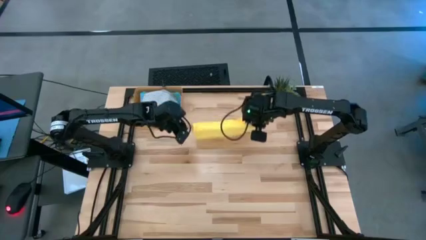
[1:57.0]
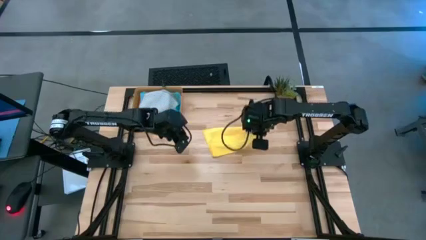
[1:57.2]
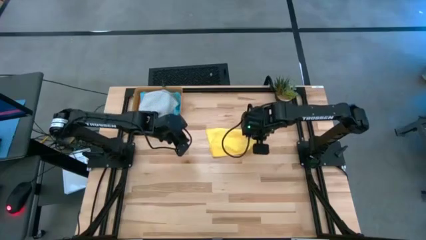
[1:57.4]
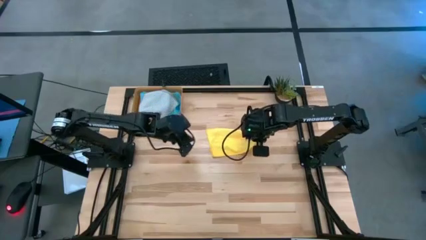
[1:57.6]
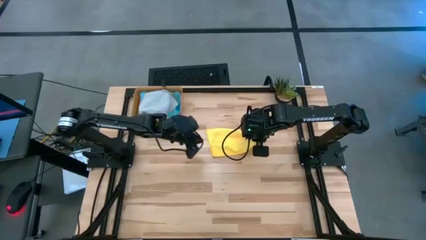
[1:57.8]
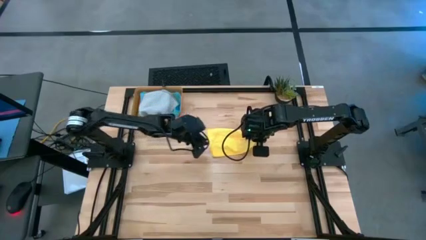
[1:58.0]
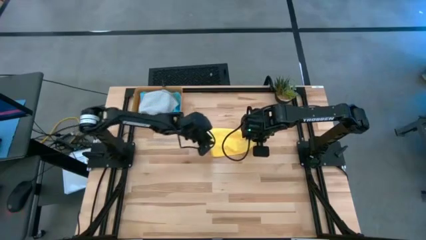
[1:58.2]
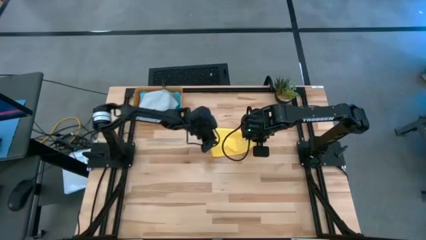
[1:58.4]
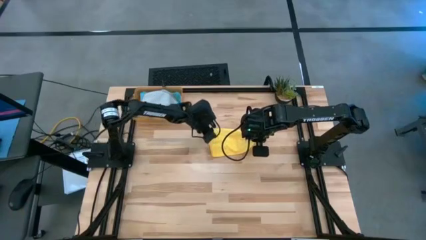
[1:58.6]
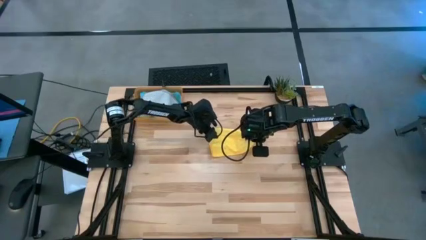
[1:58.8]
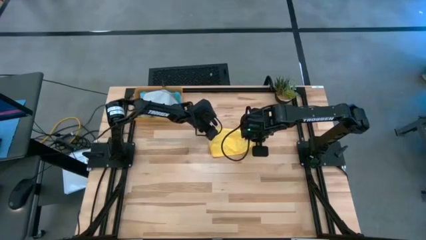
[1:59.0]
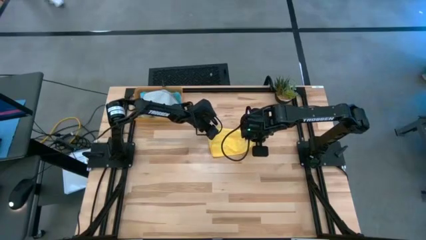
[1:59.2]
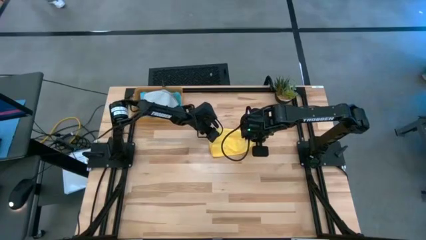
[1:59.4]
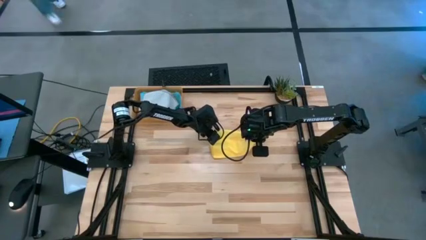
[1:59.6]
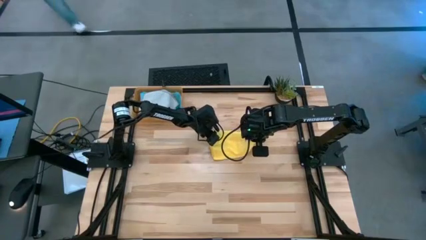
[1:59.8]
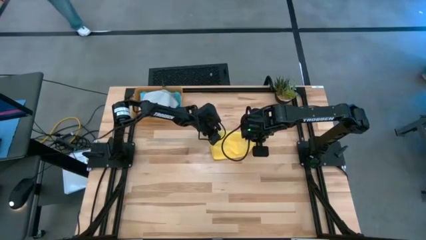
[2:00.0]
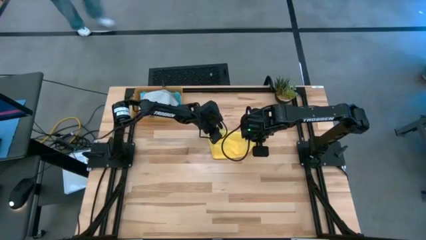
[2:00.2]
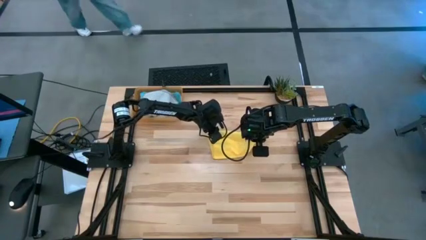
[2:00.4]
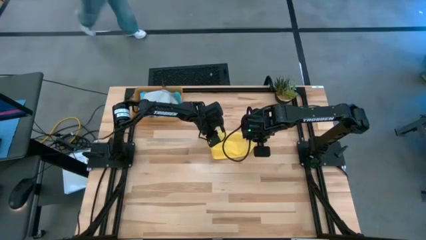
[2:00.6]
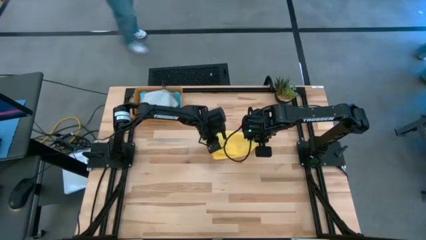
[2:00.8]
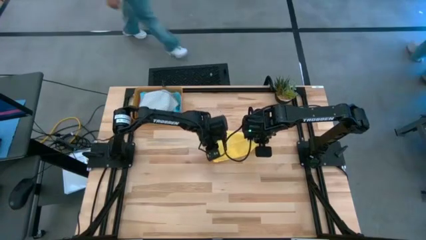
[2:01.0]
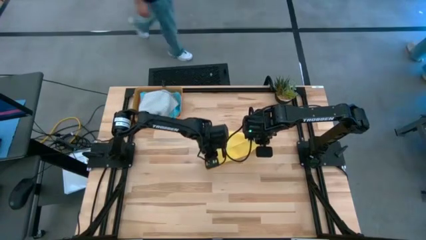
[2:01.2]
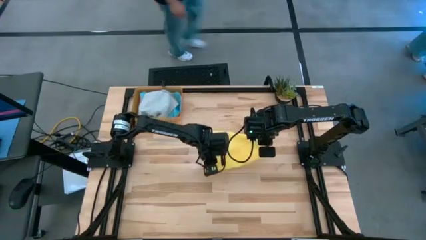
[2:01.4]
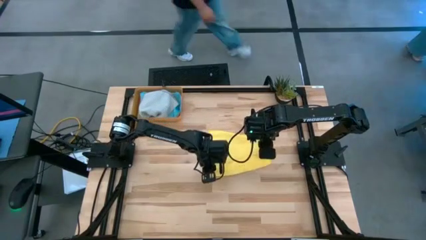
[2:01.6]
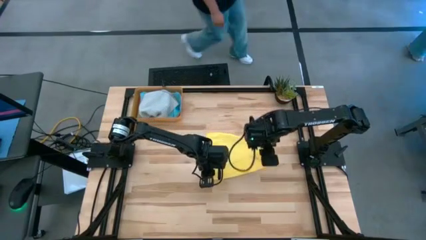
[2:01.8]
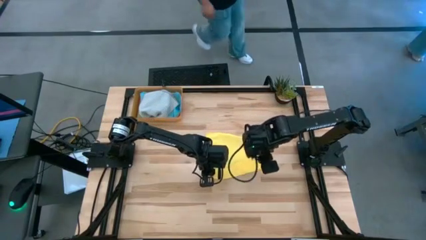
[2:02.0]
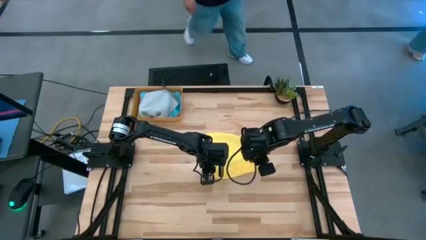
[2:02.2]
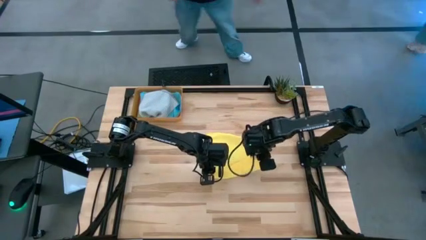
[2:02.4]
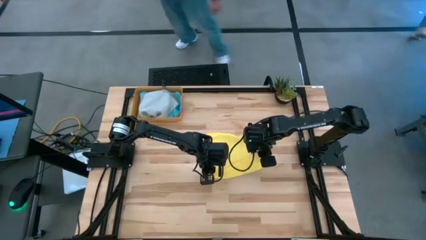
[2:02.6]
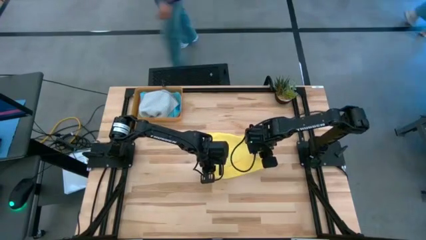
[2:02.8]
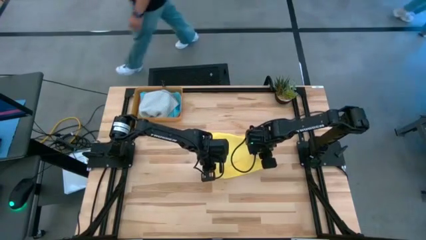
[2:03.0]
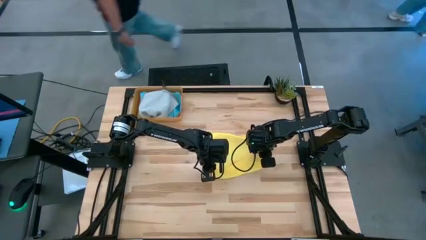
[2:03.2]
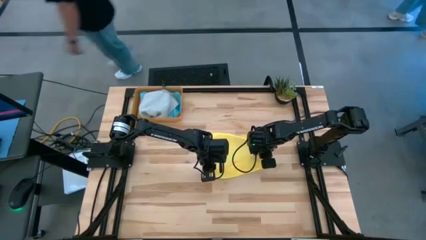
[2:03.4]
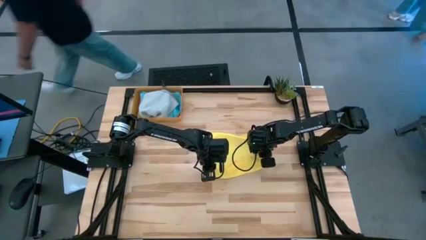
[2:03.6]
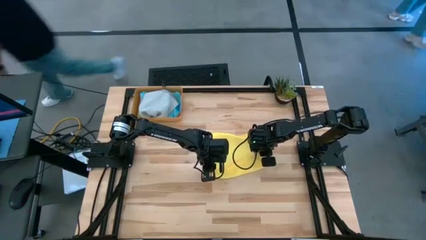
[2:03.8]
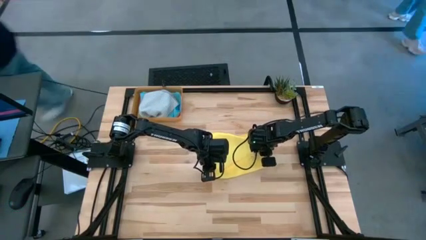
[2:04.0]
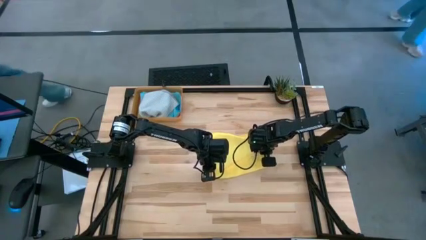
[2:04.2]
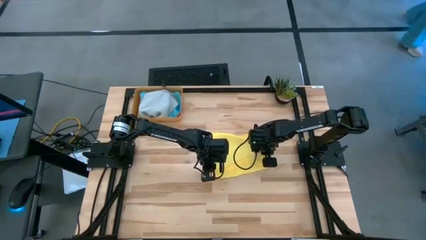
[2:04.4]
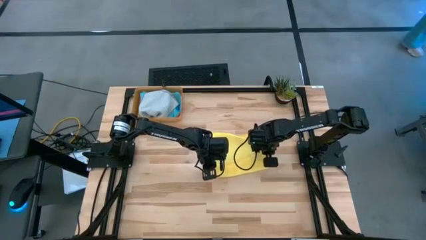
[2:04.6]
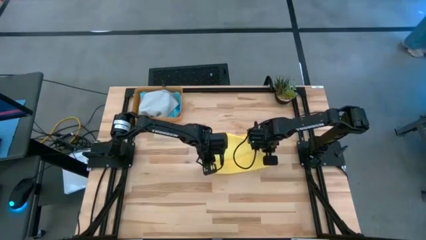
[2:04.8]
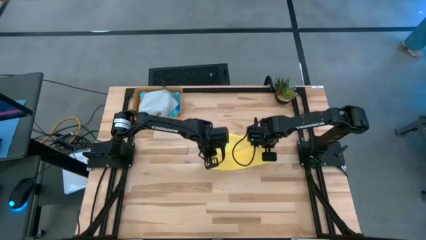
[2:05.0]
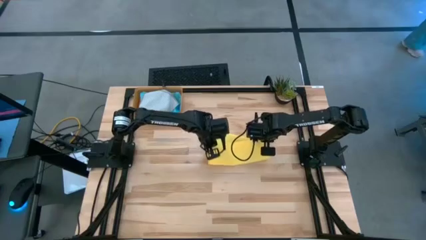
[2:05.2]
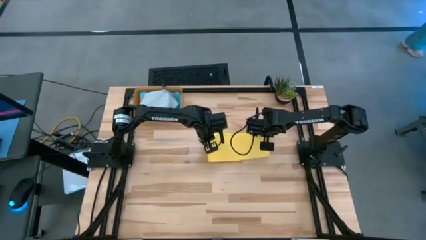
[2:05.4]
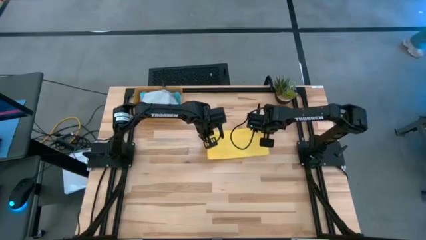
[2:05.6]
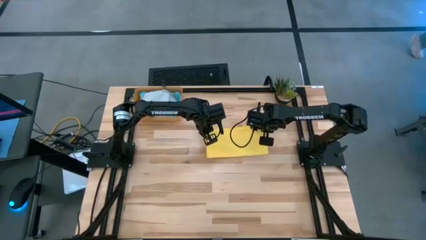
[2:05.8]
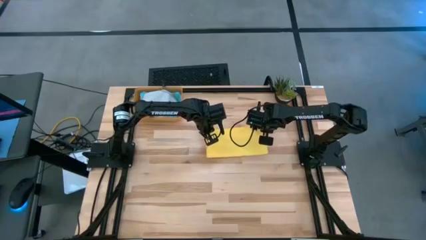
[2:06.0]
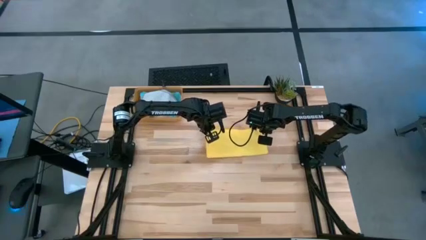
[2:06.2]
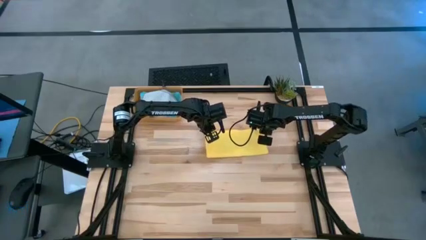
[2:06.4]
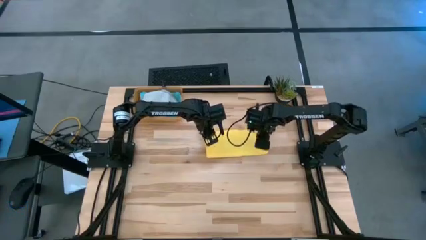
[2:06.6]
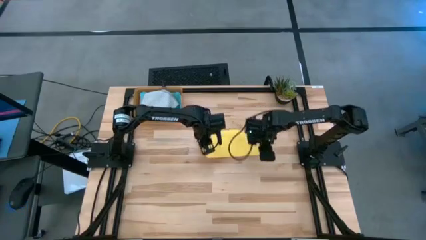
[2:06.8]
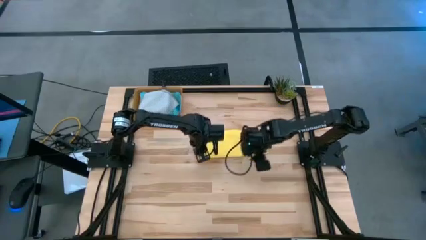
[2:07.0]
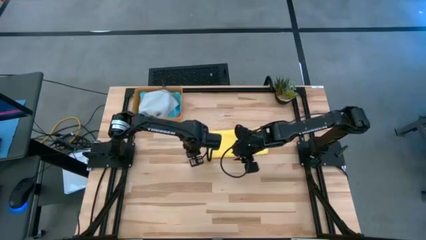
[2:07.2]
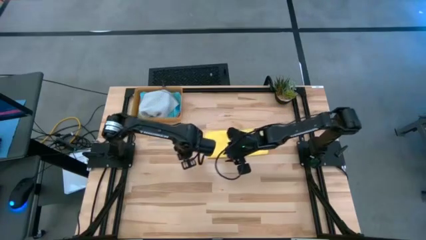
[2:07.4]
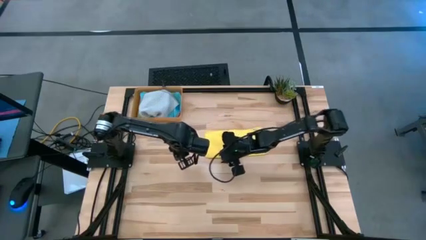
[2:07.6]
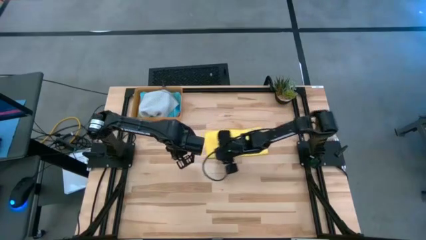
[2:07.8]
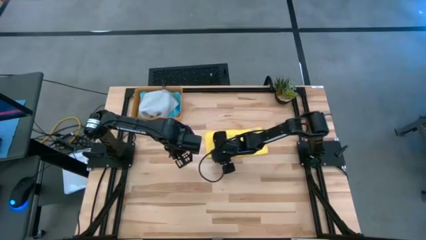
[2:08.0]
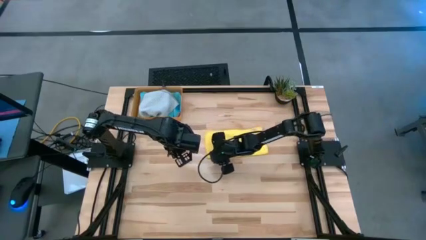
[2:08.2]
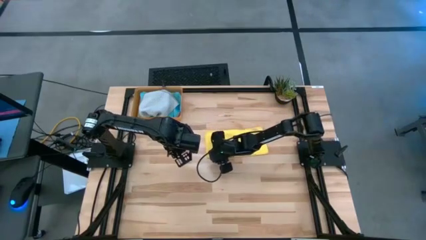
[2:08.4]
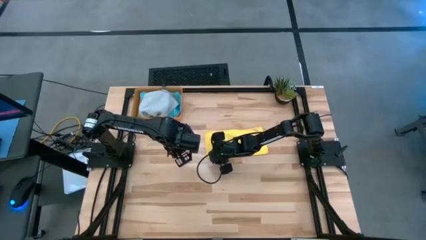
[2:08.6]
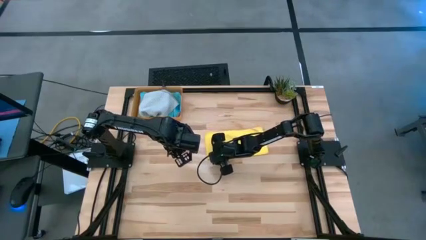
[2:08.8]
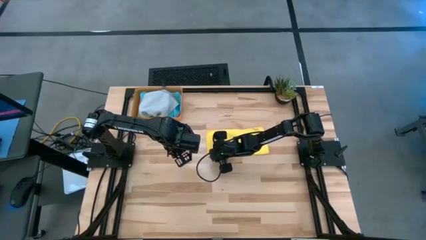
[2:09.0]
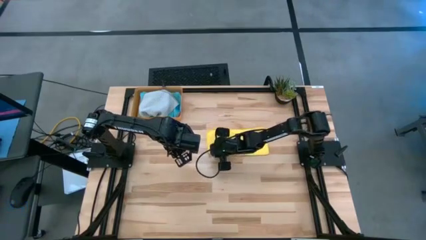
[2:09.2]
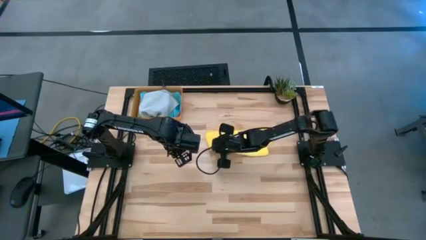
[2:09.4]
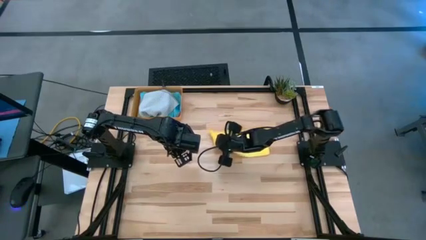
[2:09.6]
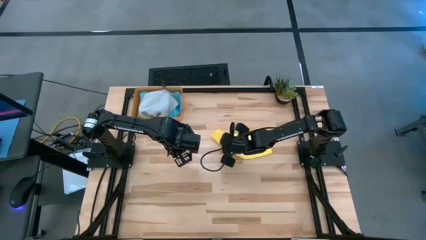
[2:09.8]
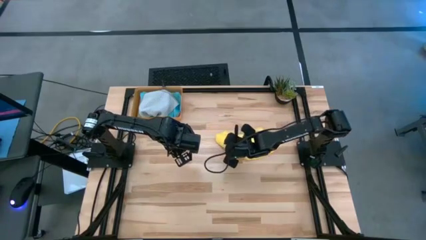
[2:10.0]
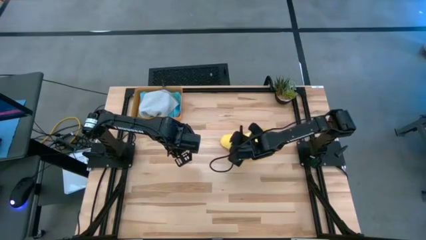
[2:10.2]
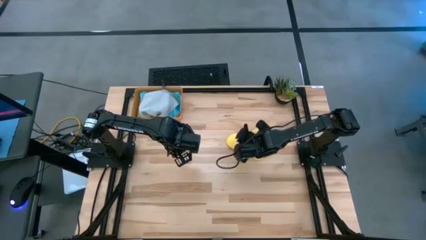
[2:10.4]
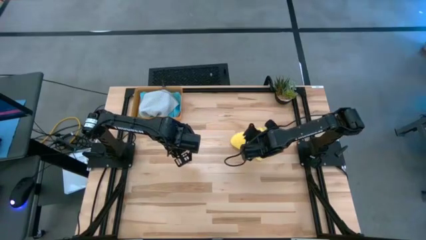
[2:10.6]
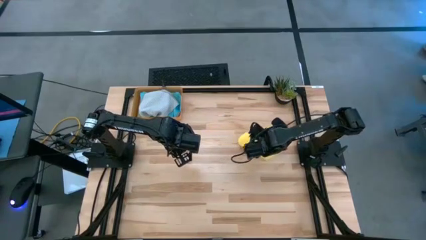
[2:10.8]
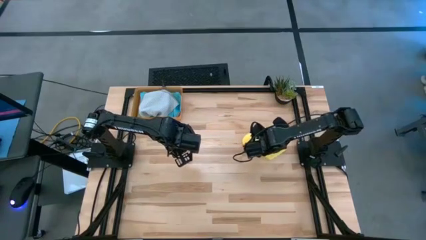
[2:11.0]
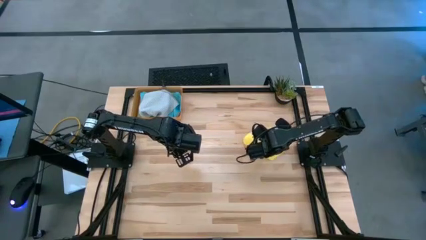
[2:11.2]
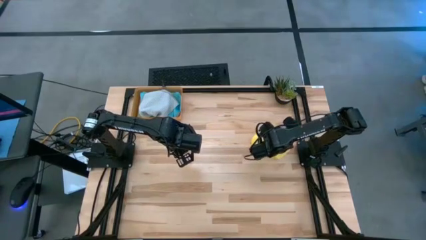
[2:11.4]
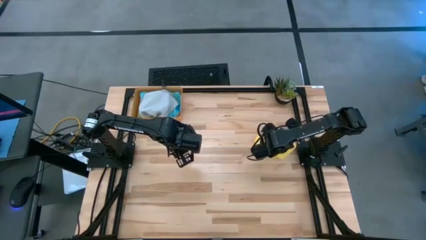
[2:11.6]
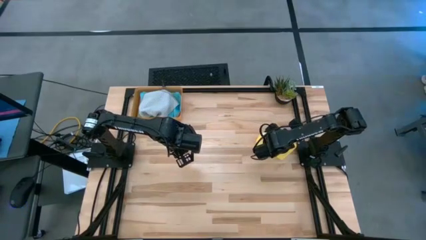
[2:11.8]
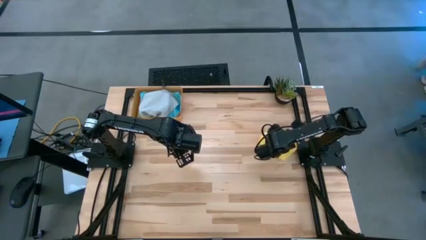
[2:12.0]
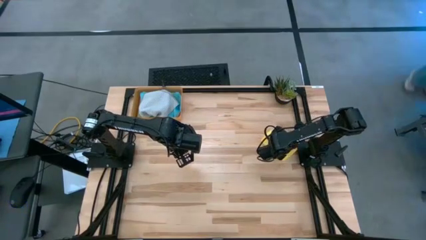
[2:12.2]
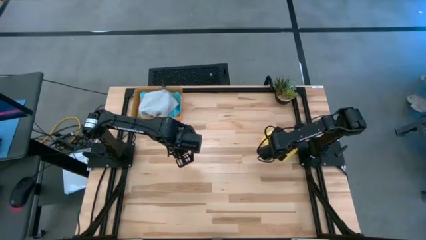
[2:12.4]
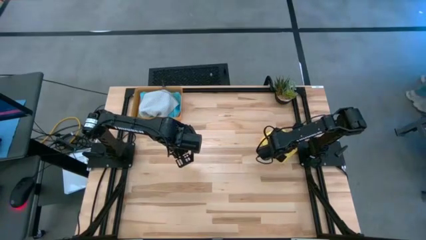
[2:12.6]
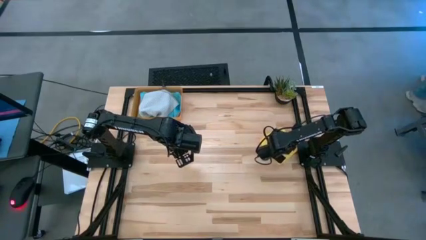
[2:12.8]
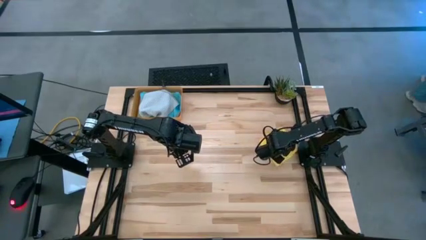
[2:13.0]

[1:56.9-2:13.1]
Task: Fold microfiber towels
Fold the yellow microfiber towel
